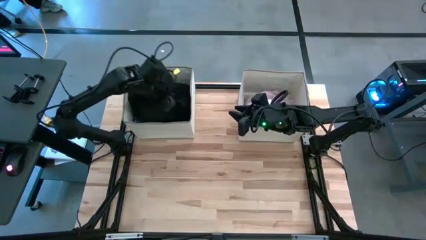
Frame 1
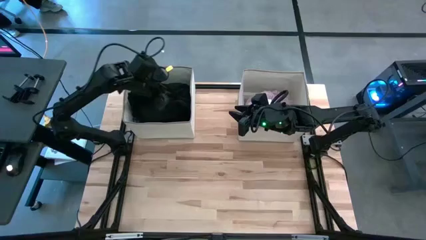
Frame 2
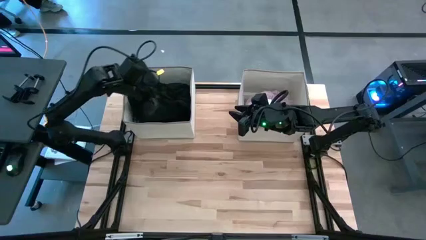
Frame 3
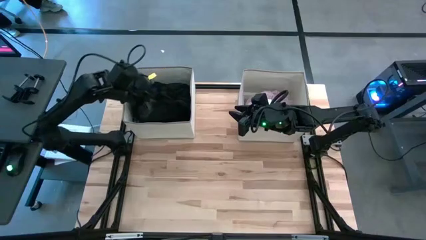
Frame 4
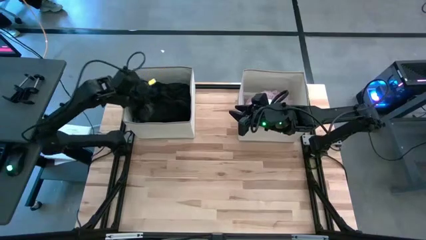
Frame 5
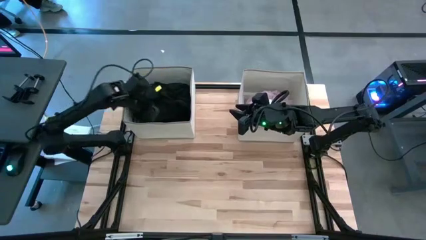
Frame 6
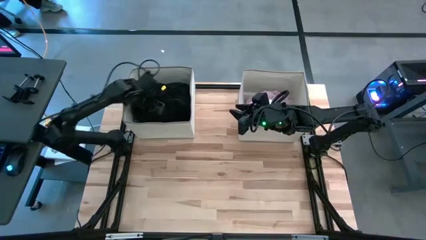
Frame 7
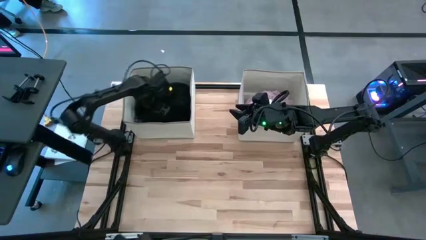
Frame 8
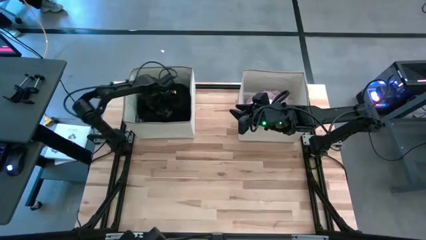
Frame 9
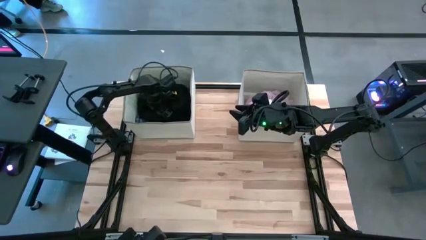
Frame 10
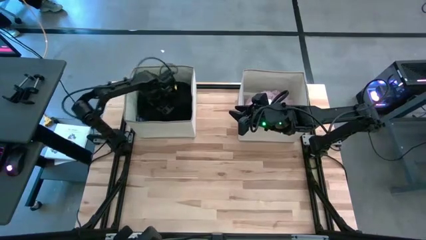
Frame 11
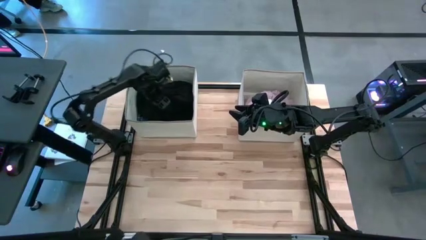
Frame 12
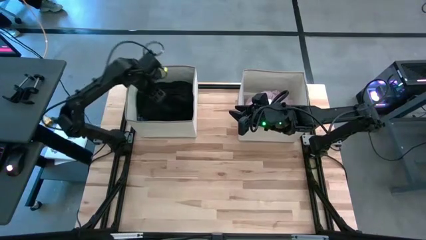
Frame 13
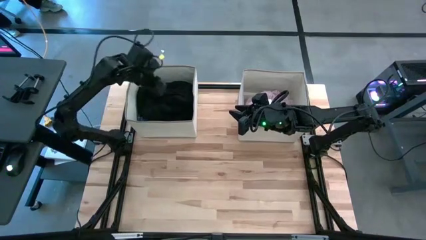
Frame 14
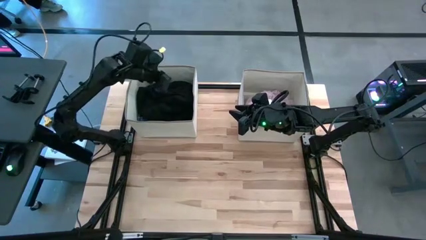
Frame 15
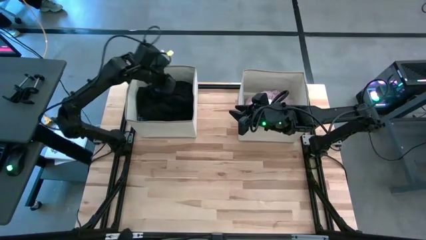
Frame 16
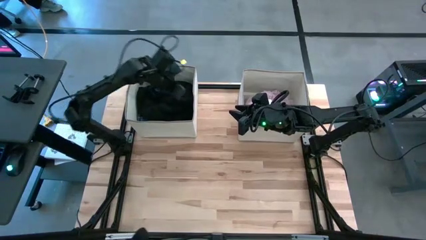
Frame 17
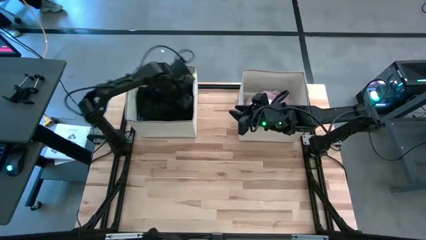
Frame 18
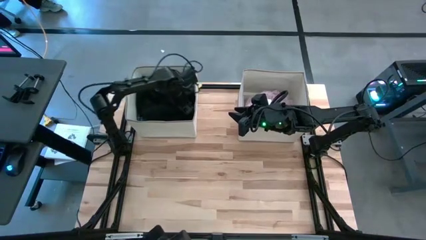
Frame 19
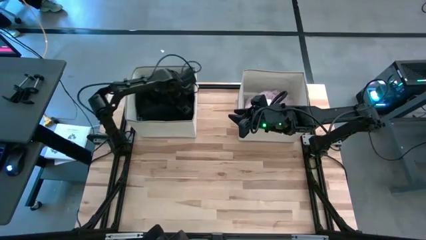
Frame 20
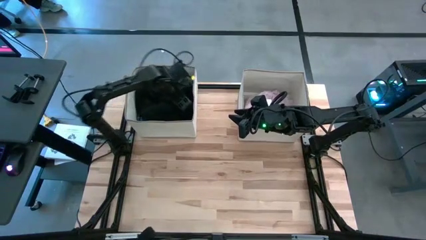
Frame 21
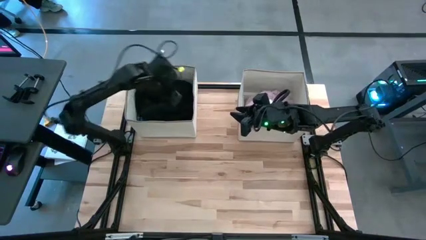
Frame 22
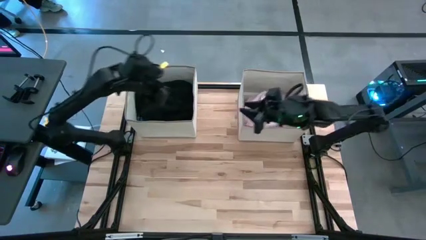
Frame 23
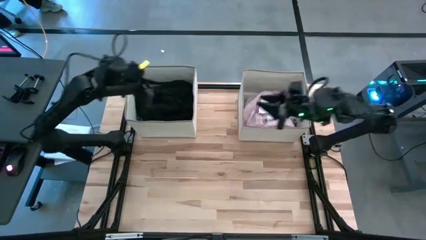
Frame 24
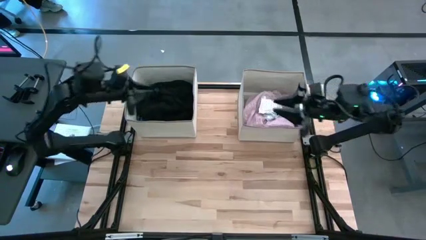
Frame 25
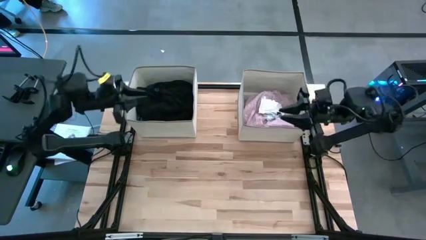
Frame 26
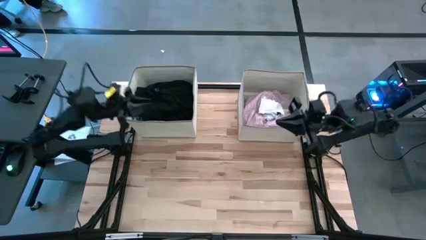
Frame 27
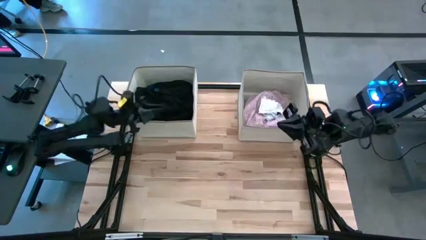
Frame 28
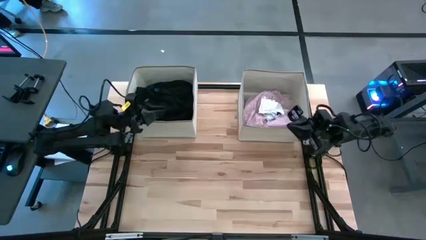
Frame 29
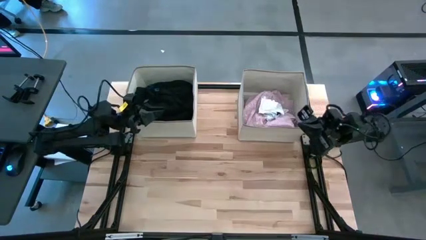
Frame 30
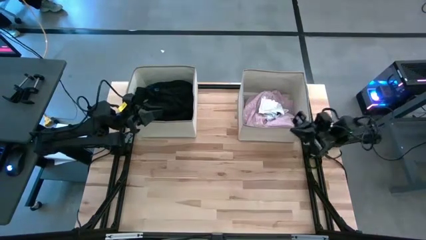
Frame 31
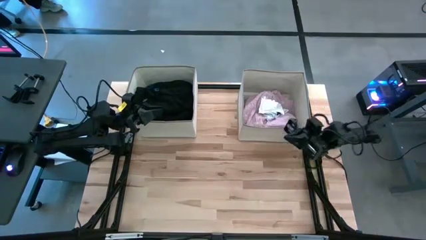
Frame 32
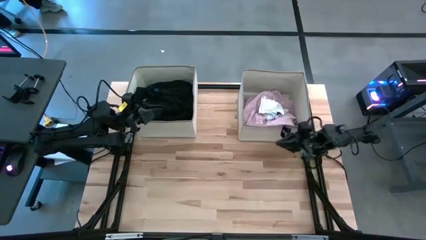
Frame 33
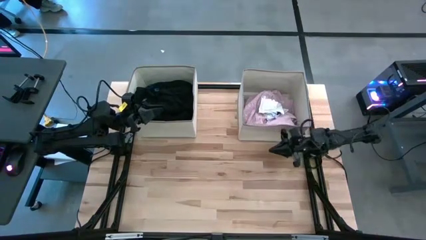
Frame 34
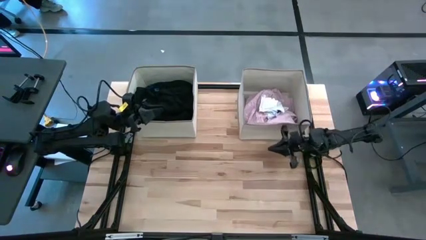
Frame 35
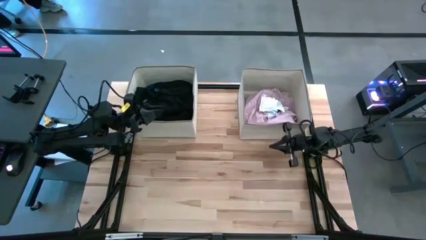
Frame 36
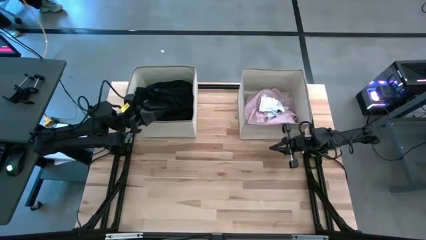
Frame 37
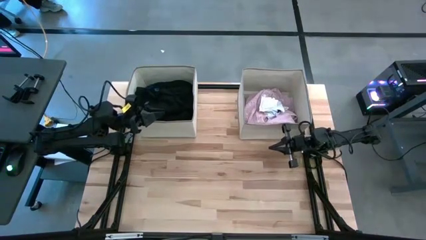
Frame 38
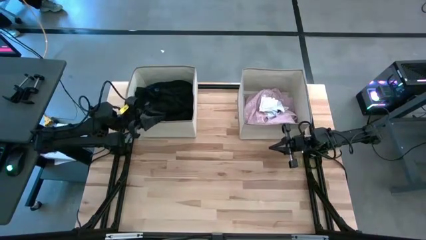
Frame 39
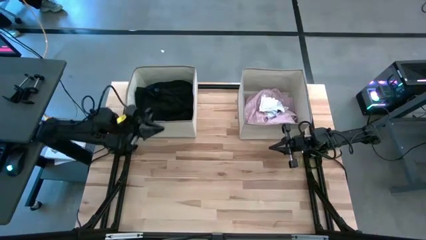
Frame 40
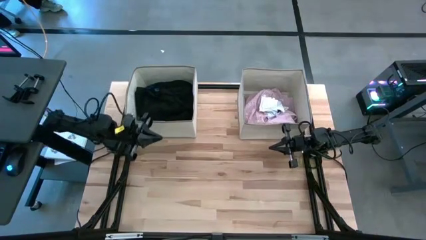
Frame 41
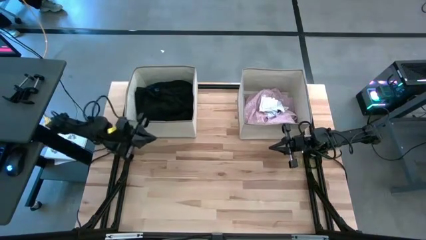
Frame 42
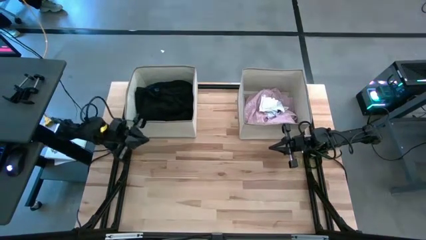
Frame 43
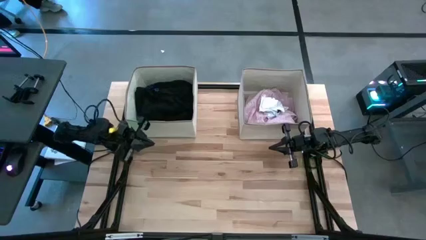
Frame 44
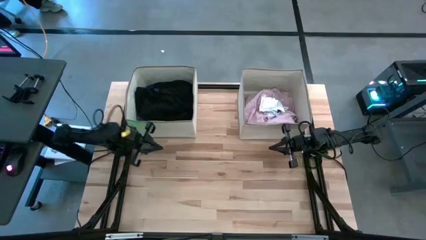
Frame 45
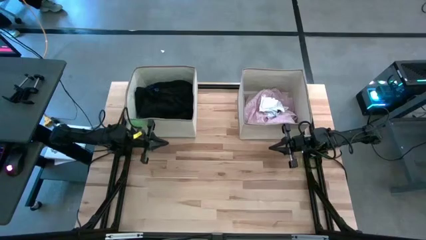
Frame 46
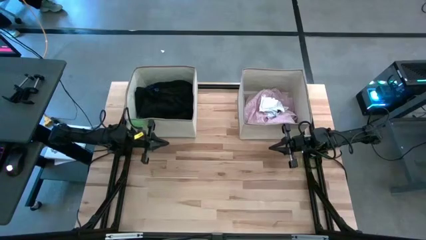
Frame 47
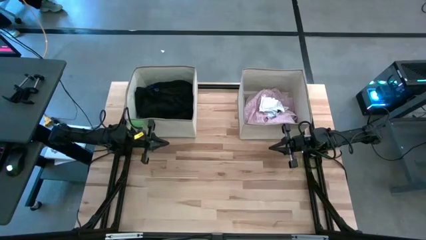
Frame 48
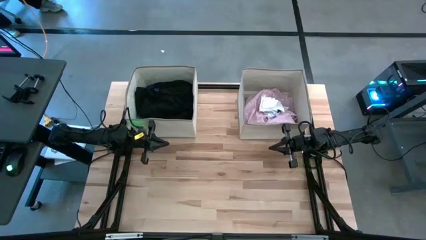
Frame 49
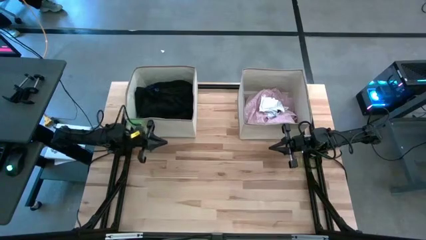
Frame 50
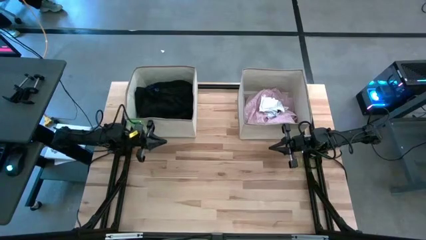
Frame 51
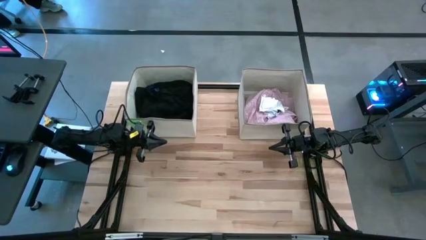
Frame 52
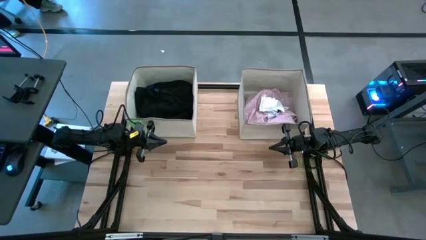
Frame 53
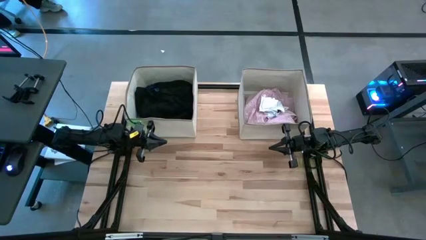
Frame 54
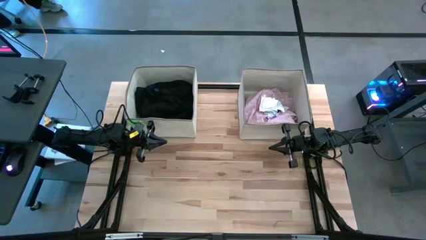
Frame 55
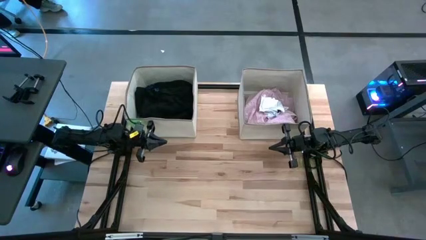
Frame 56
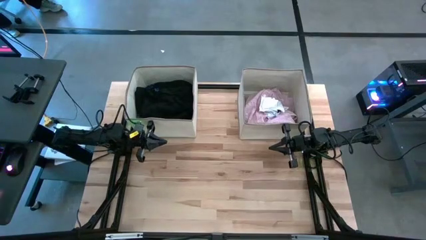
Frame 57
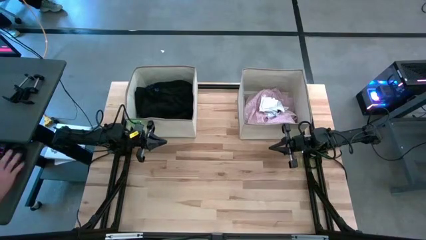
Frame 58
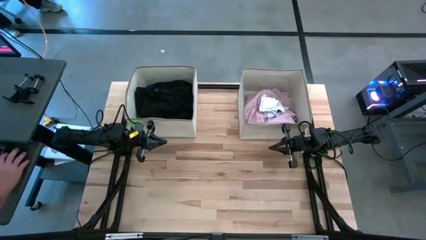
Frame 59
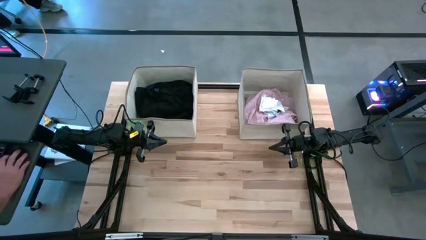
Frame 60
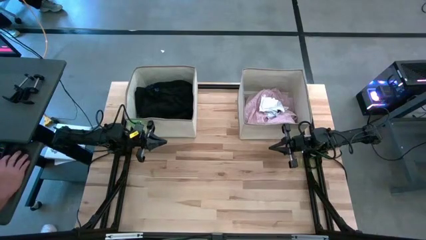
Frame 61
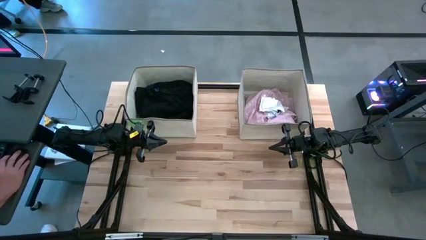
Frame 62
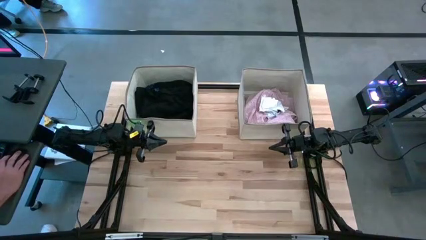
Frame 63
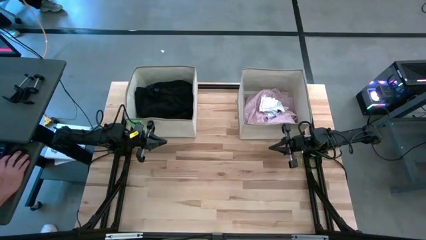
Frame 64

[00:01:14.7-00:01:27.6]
Task: Sort clothes
Return to Home Position

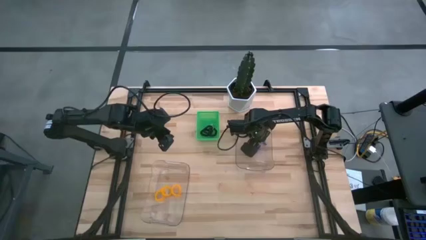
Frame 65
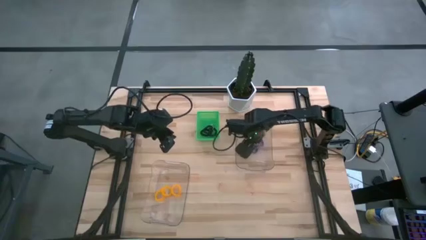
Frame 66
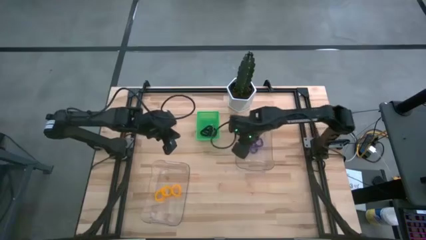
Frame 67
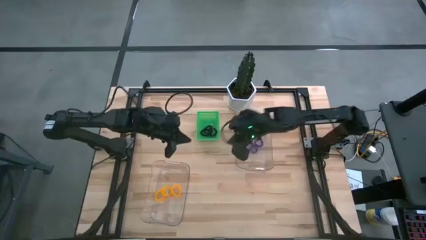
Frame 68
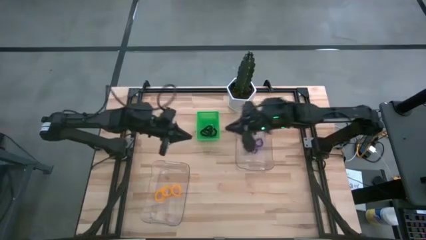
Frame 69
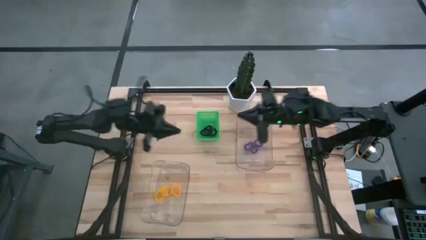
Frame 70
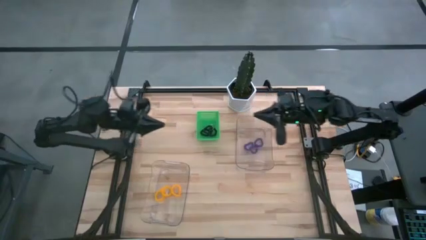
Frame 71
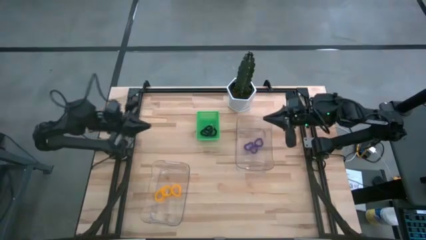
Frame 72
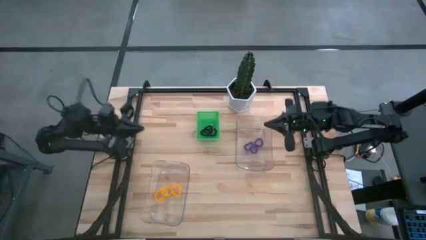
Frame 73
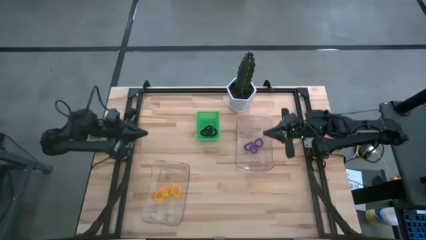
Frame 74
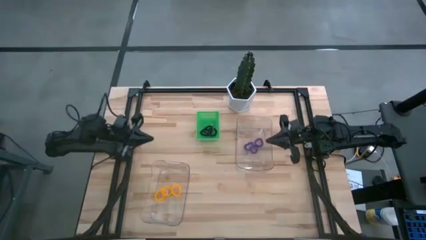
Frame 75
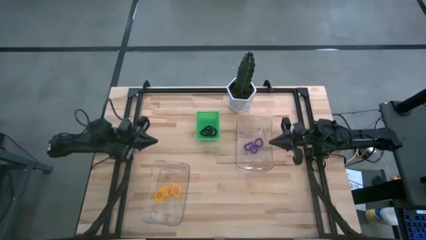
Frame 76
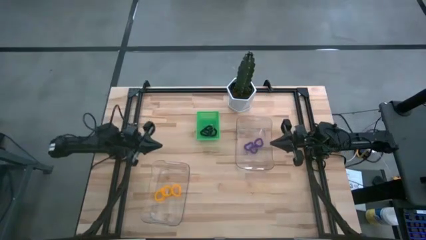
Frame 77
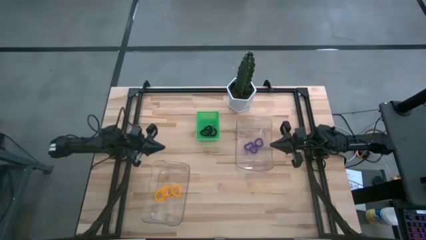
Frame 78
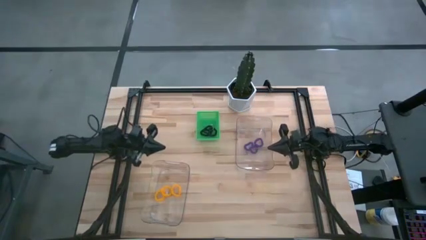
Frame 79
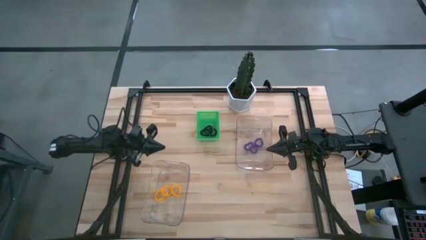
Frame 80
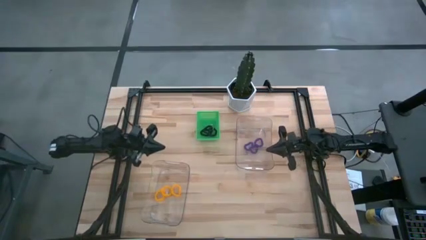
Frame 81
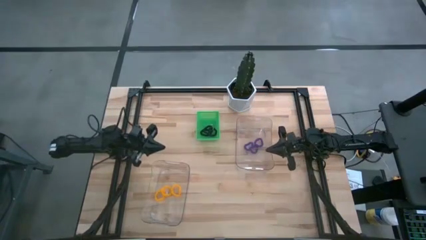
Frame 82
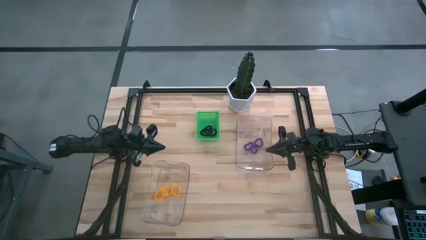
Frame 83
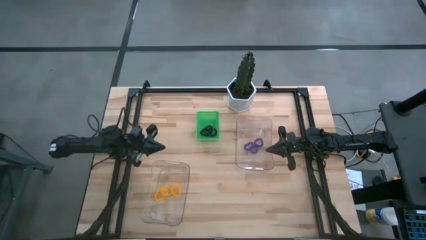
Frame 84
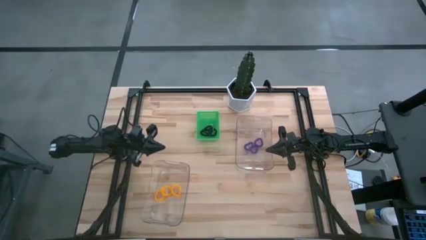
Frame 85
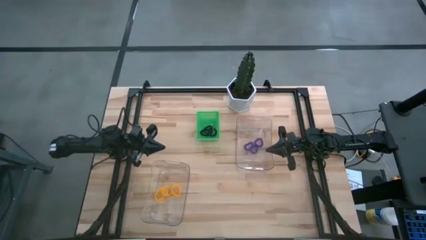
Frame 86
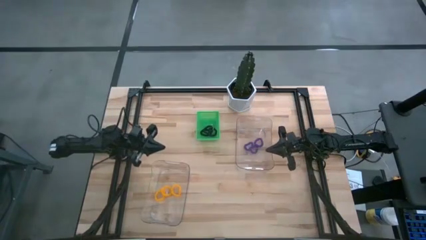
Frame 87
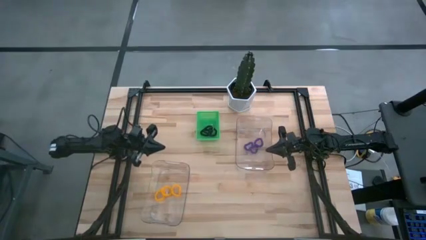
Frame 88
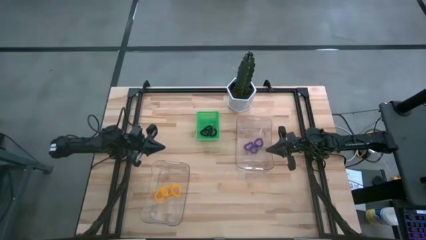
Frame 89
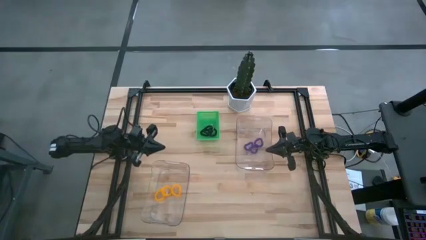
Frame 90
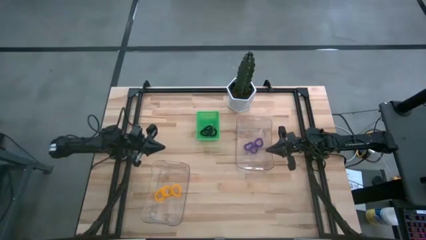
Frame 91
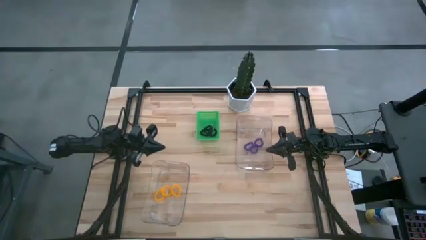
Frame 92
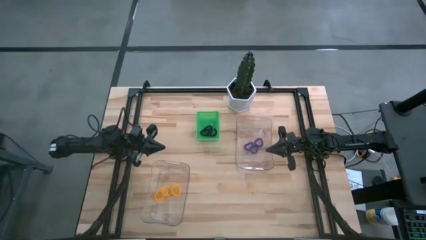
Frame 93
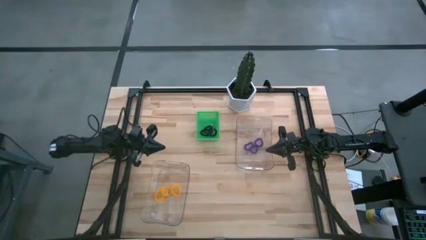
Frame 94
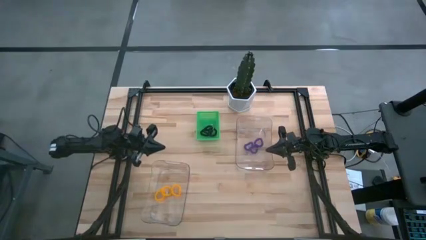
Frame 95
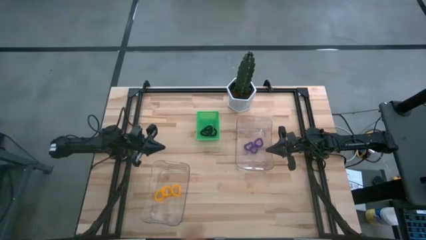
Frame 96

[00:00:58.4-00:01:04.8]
Task: Sort spring keychains
Return to home position
